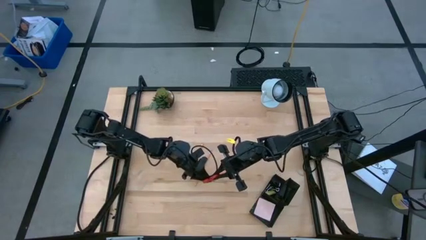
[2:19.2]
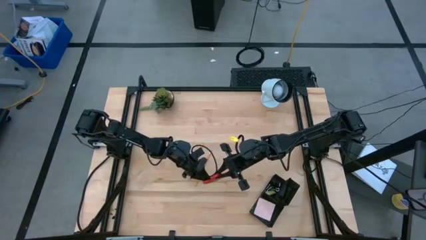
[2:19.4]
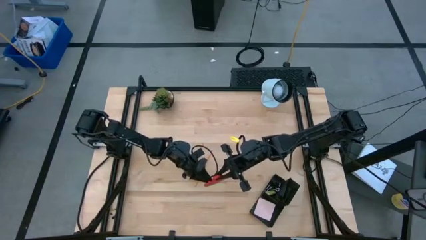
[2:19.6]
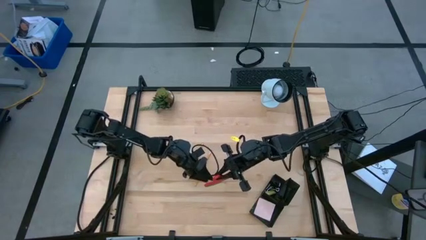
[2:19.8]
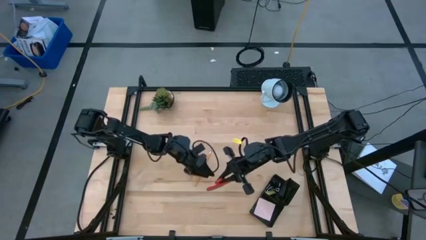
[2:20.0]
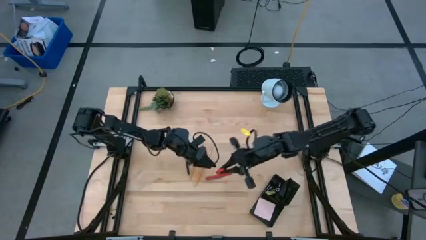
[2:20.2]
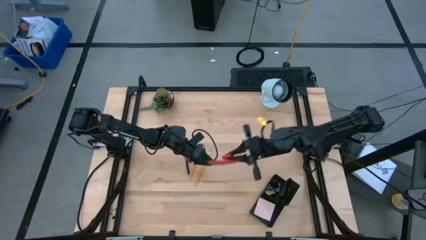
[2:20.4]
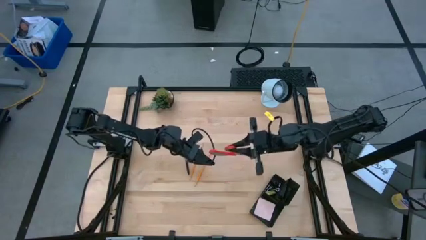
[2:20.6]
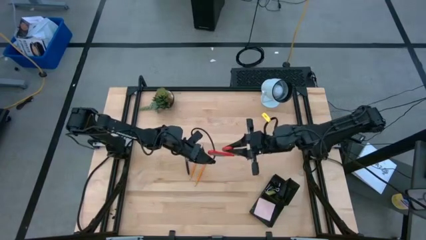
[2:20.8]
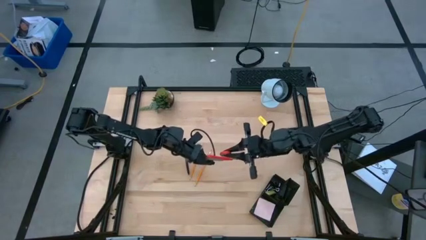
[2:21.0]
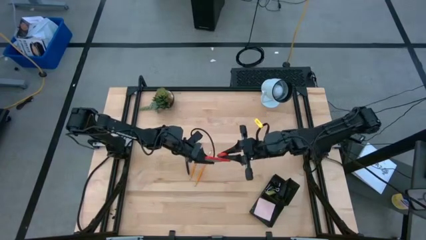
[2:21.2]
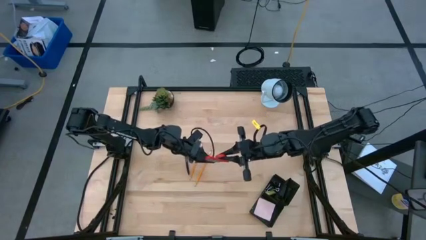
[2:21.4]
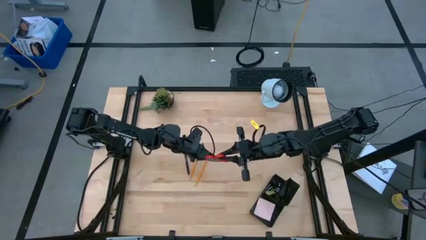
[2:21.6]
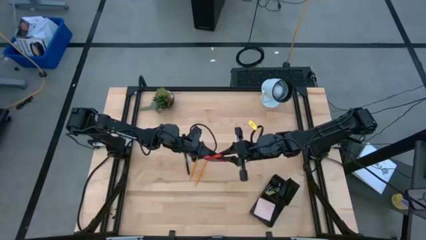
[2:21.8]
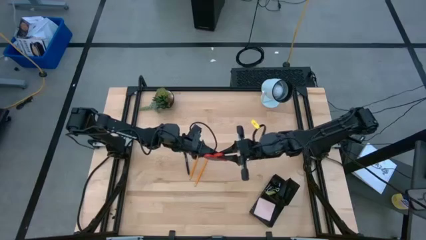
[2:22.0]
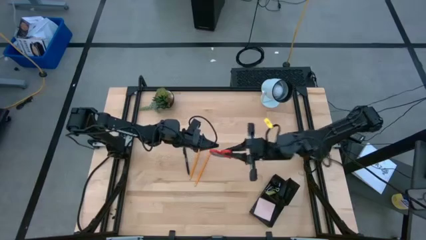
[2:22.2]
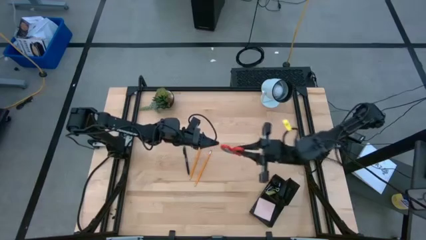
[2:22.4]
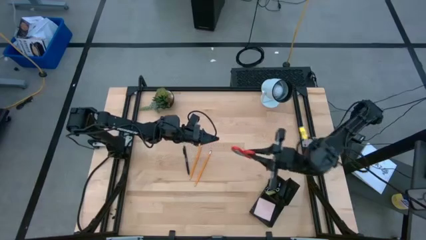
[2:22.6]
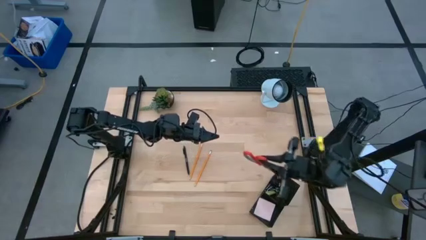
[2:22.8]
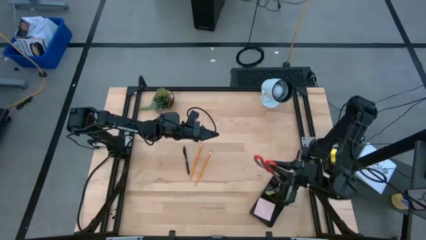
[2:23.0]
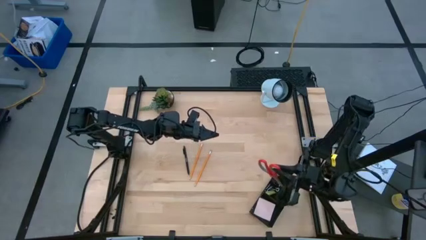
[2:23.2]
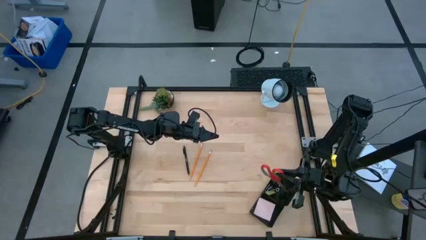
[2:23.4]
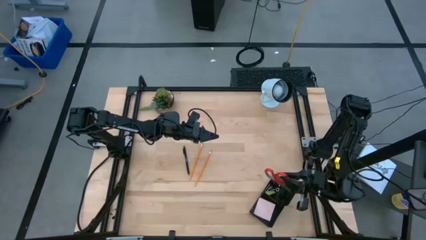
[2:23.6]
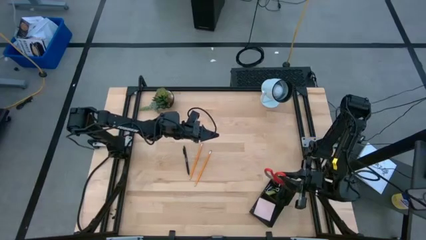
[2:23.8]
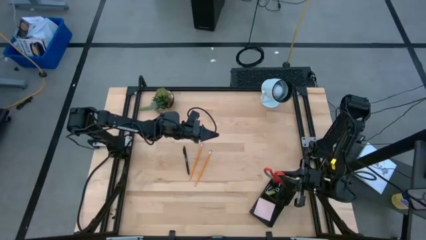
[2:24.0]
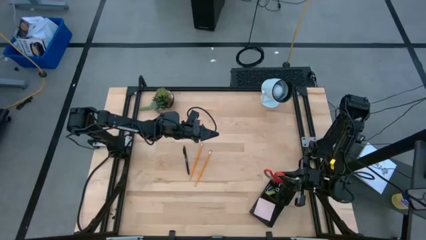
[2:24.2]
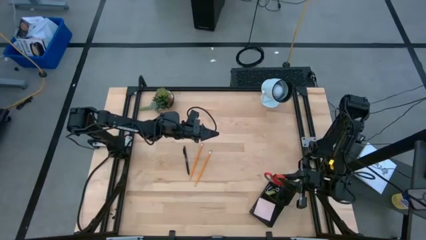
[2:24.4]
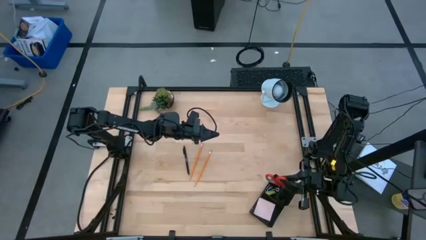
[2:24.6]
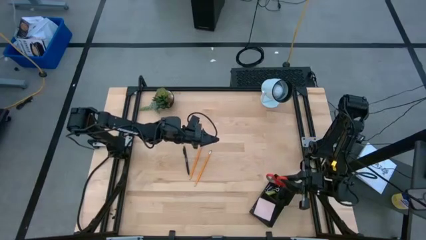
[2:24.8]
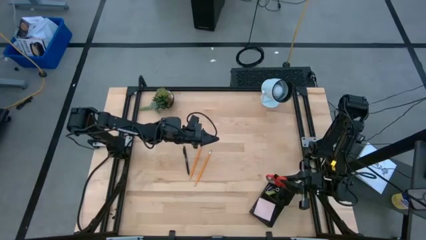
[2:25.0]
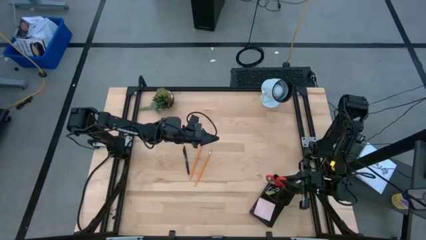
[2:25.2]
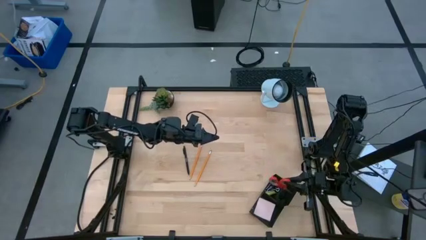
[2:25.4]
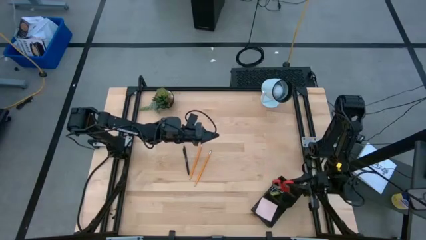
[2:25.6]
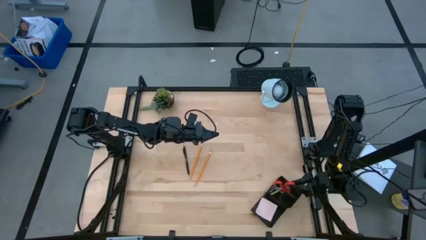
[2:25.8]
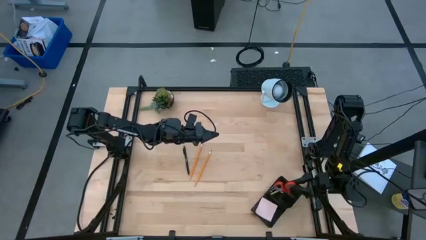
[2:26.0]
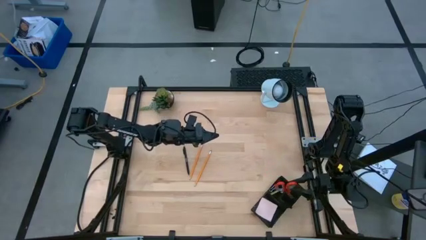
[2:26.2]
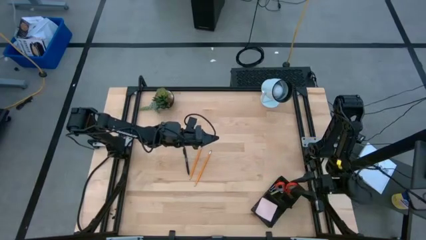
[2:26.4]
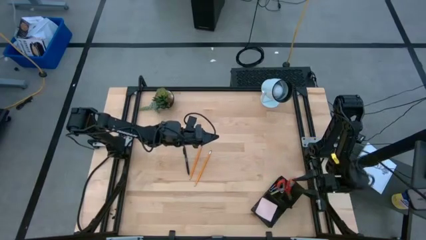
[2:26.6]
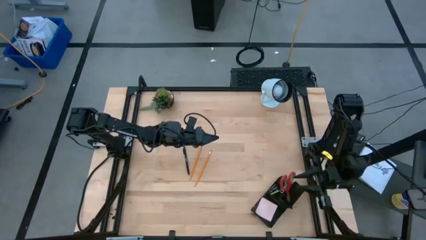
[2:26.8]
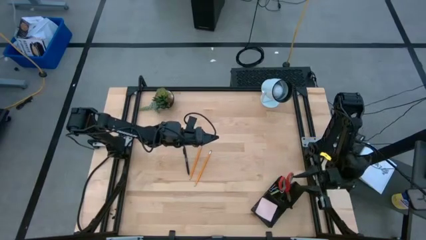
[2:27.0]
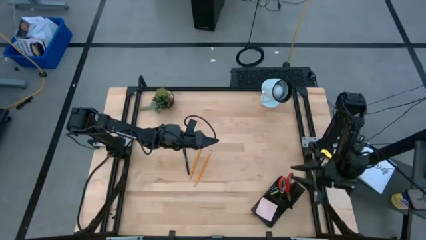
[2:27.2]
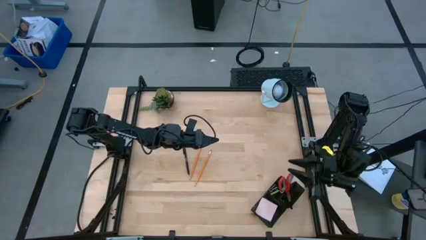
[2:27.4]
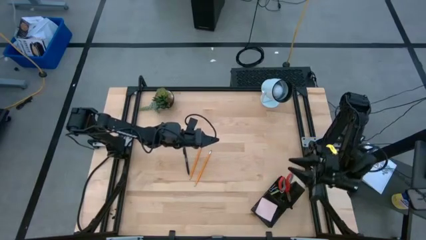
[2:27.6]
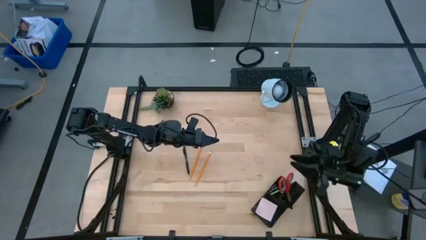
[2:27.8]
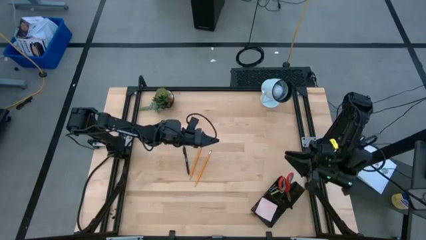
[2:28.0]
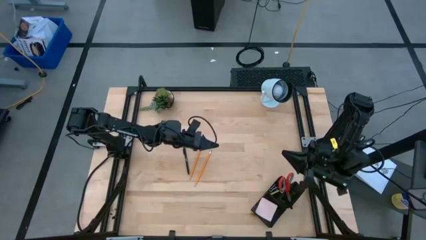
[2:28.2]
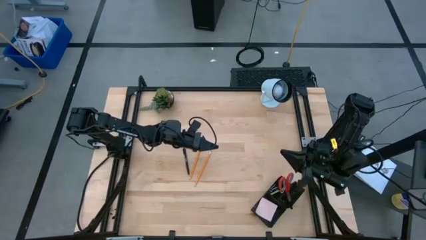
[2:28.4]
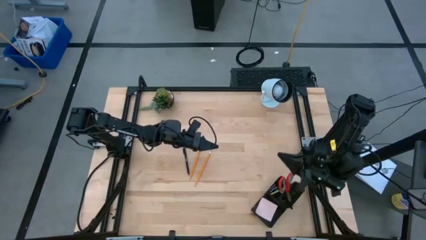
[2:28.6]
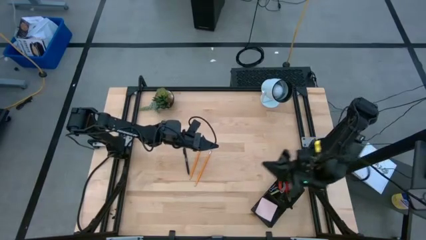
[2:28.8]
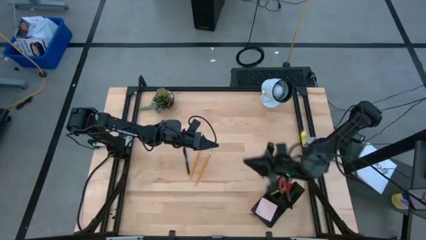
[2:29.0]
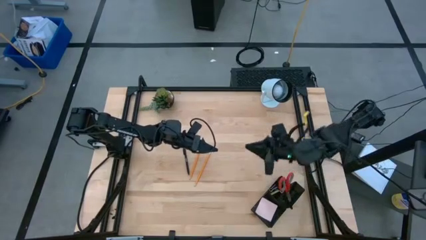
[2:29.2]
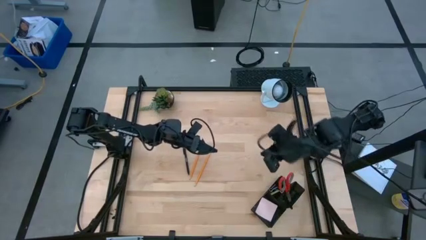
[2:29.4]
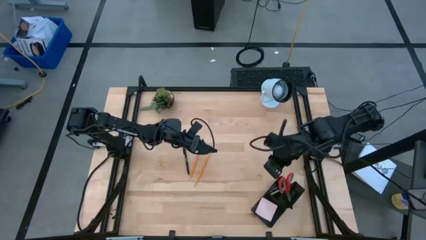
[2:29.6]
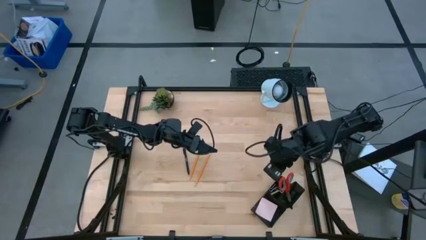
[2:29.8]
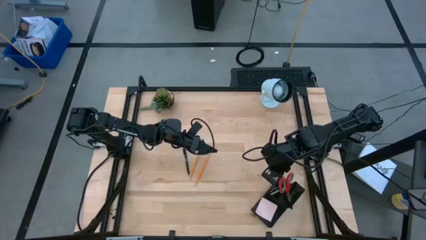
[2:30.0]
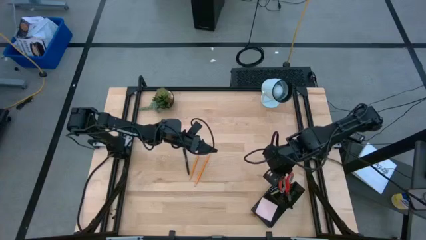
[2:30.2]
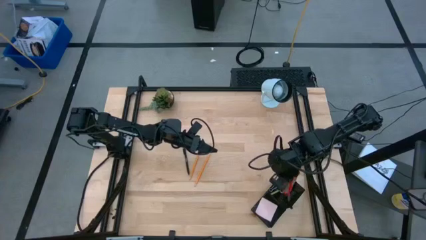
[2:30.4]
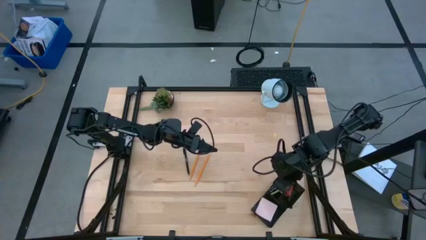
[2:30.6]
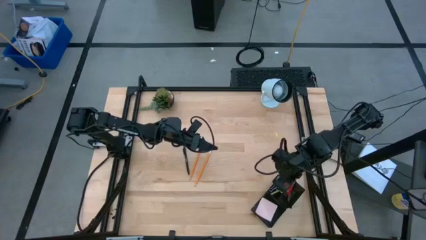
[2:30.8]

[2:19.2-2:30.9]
Task: Pick and place office supplies into organizer
Put the orange scissors into the desk organizer

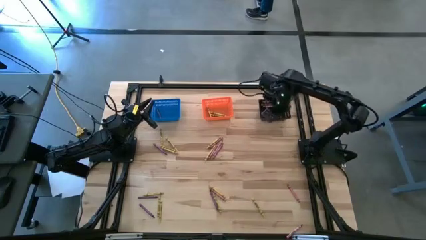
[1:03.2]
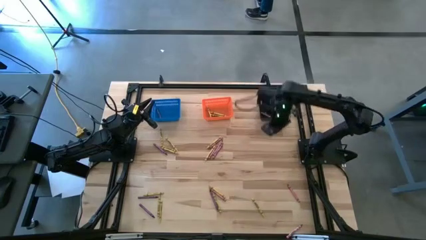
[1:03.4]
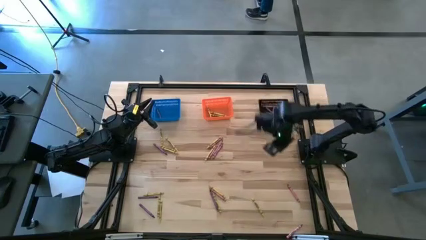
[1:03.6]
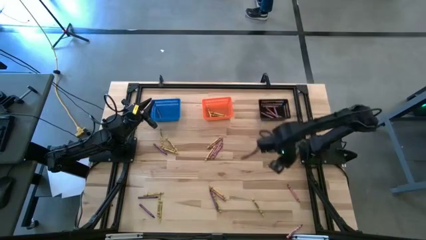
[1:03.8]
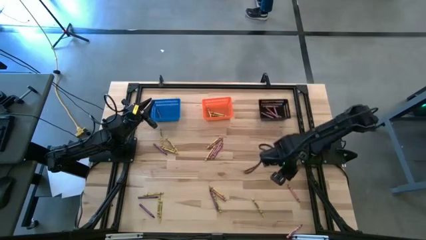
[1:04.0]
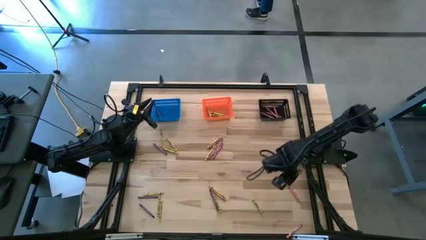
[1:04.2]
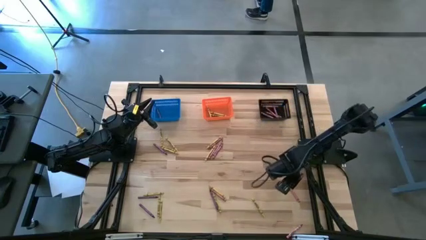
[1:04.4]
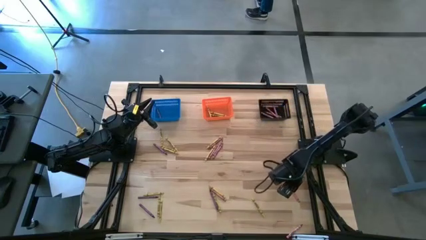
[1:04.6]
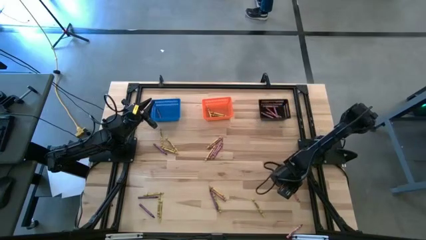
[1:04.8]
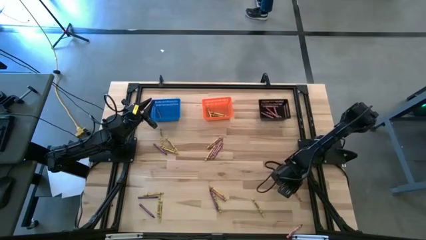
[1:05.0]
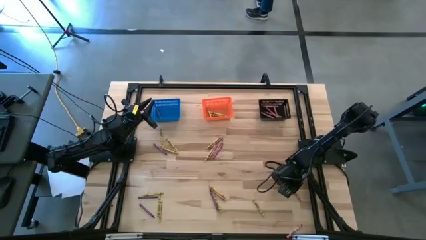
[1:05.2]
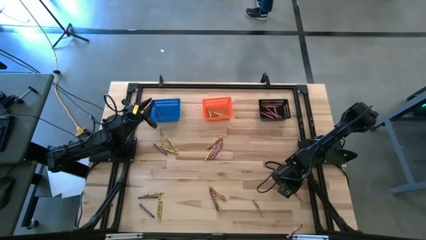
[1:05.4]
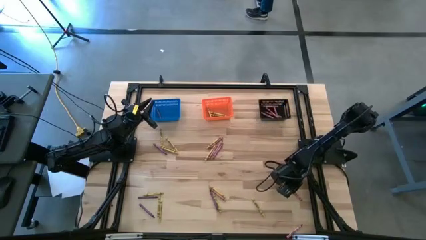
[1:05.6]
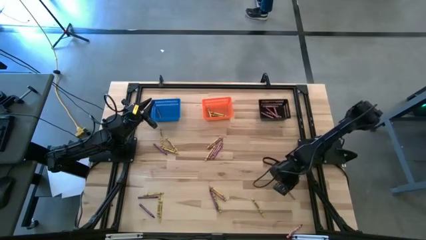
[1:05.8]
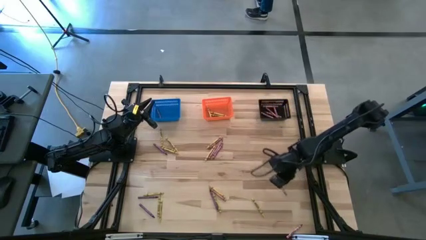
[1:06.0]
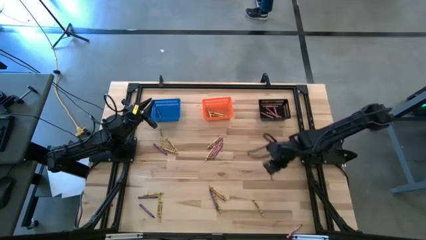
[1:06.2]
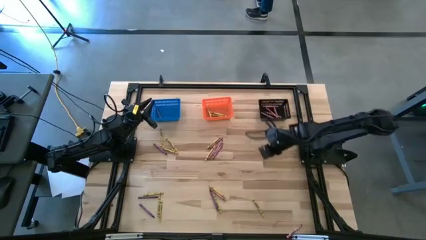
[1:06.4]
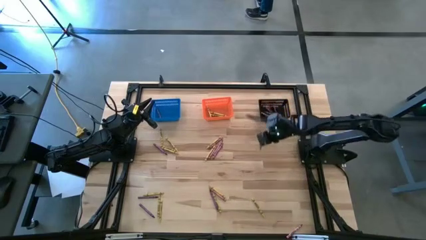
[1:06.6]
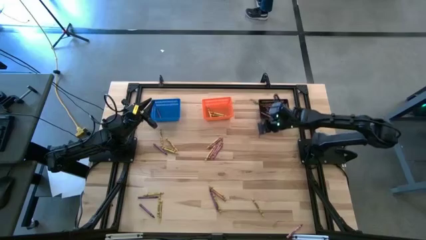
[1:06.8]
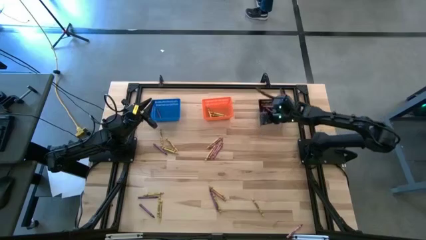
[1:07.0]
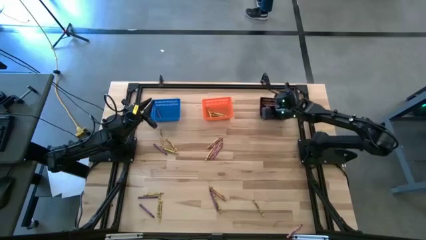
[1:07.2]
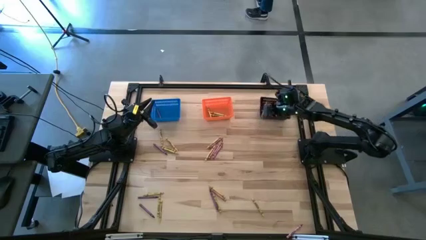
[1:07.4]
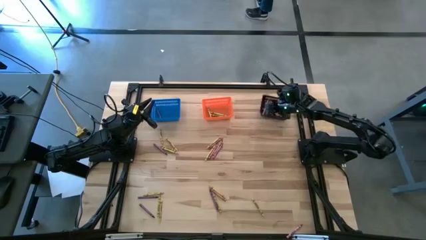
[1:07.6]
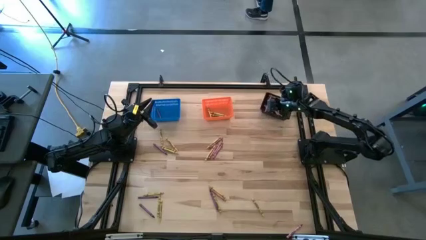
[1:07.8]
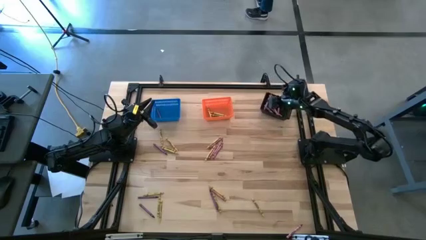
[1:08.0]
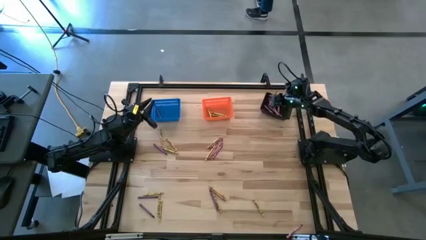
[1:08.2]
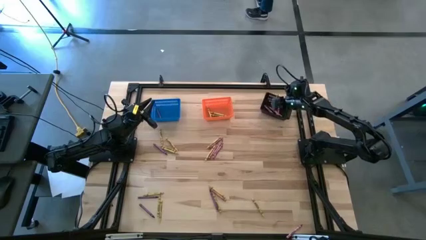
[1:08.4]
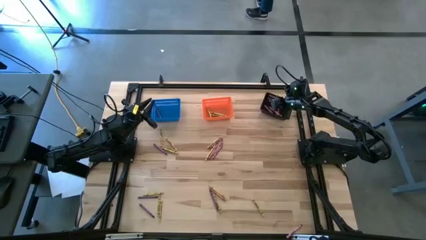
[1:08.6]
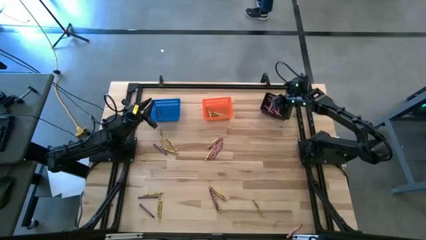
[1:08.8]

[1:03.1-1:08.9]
Task: Sort crayons
Put the red crayon into the black bin
